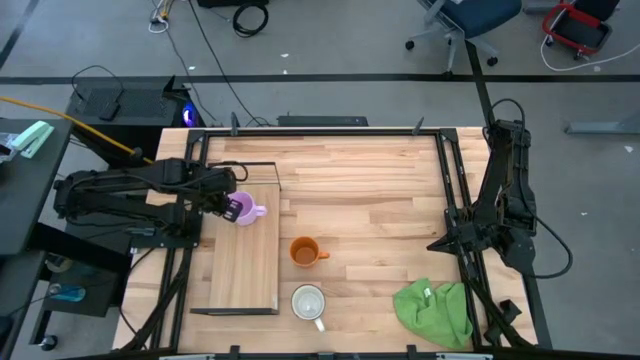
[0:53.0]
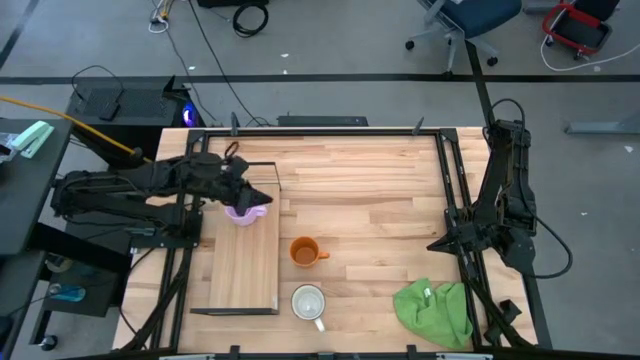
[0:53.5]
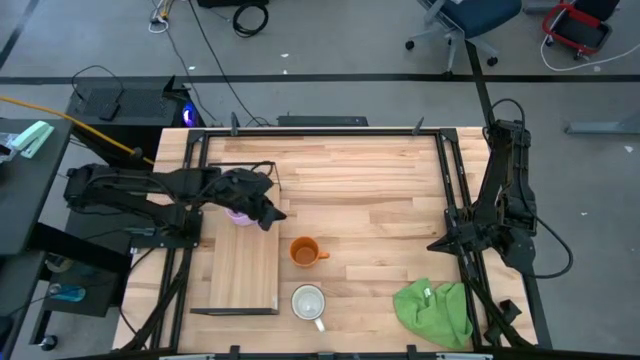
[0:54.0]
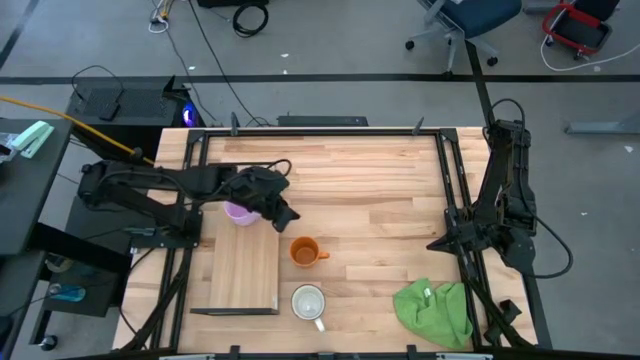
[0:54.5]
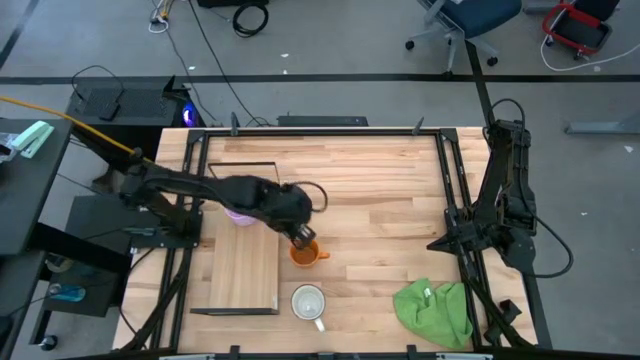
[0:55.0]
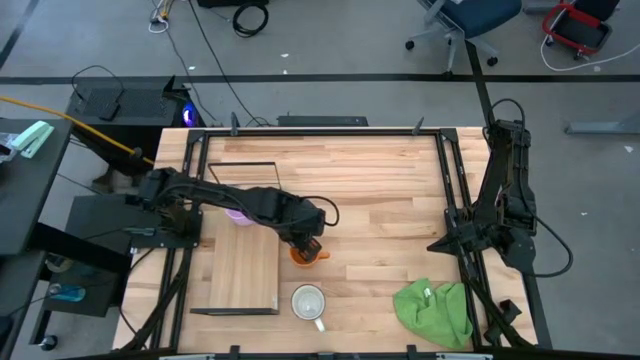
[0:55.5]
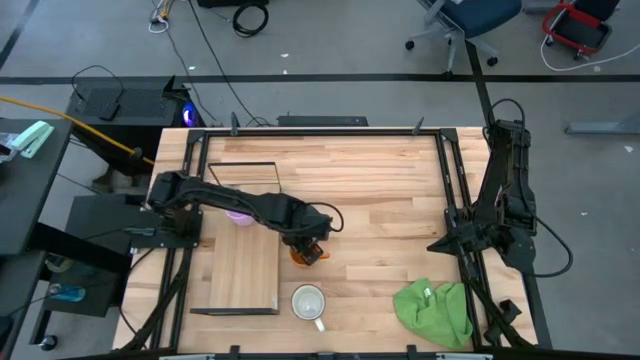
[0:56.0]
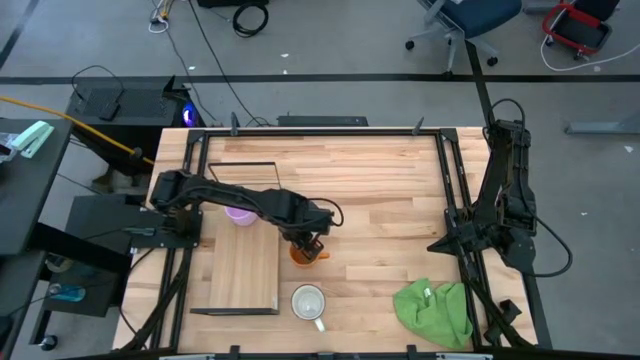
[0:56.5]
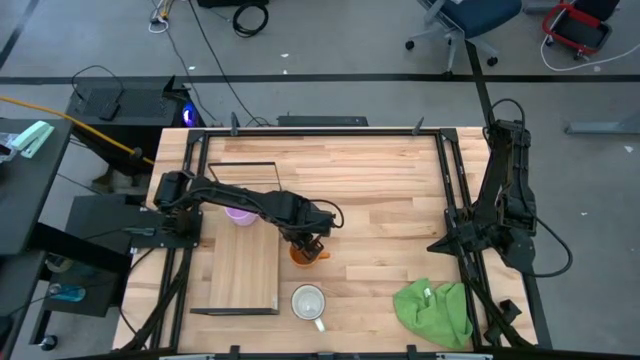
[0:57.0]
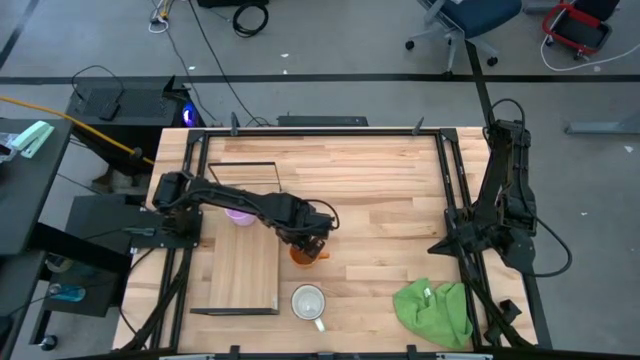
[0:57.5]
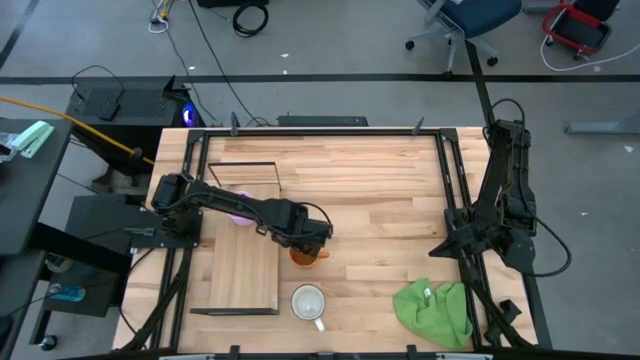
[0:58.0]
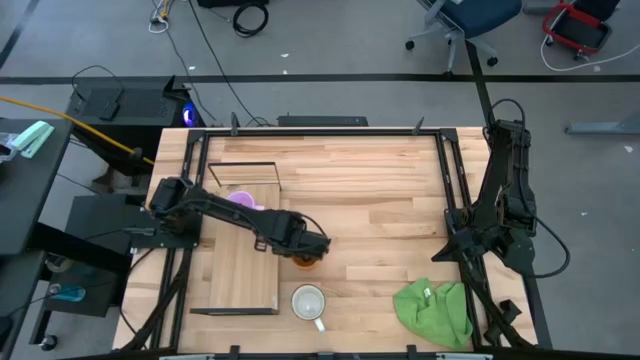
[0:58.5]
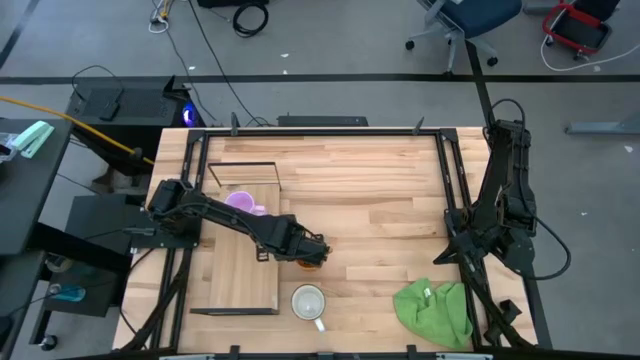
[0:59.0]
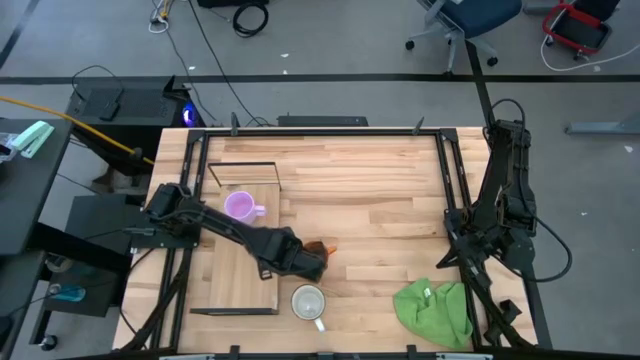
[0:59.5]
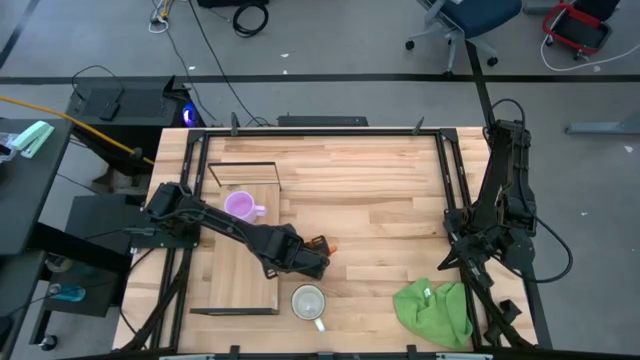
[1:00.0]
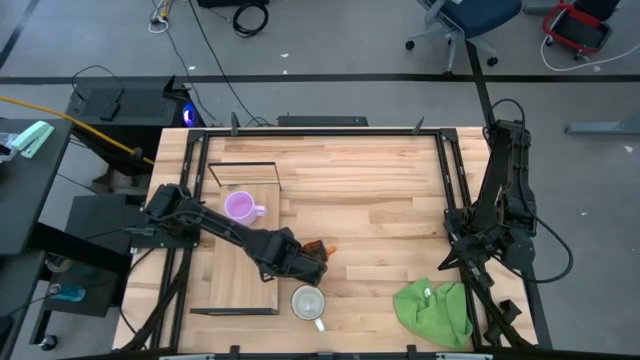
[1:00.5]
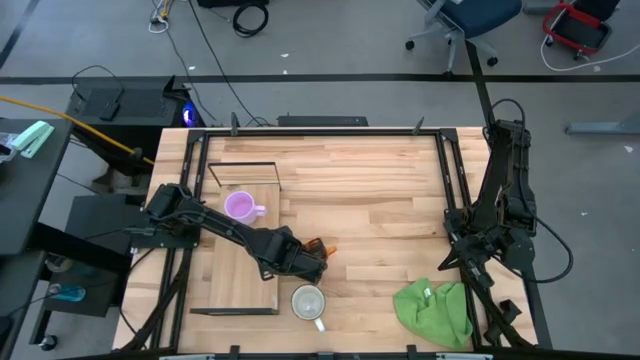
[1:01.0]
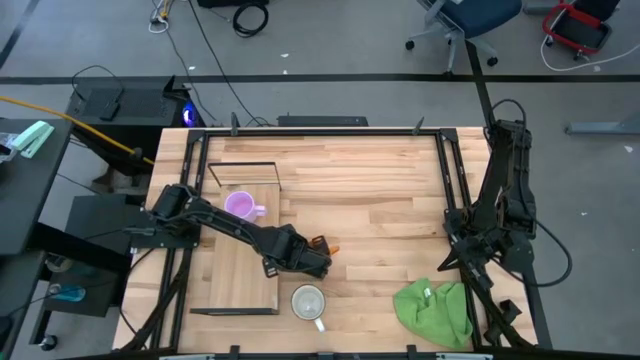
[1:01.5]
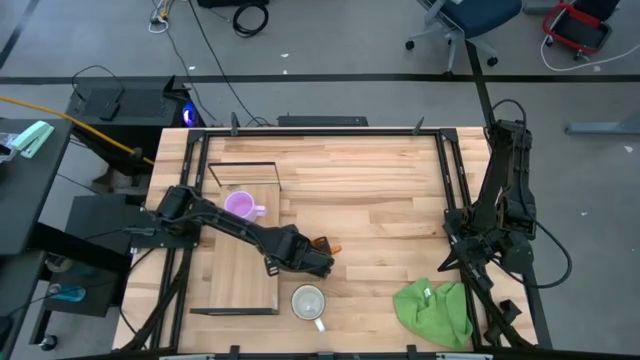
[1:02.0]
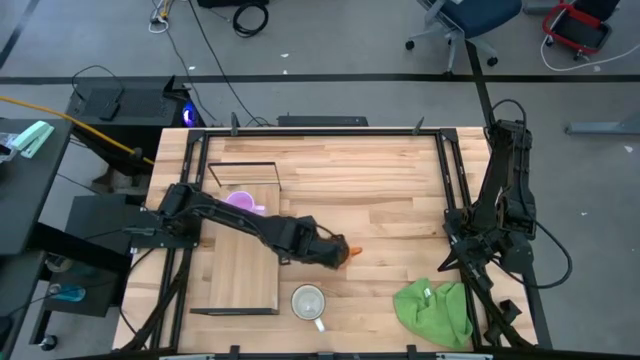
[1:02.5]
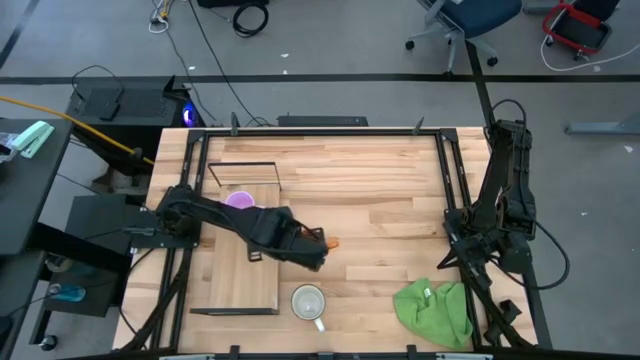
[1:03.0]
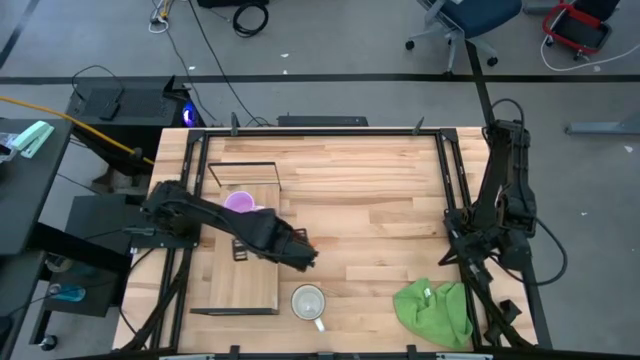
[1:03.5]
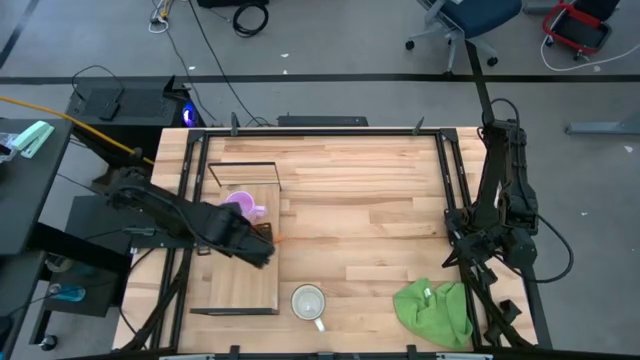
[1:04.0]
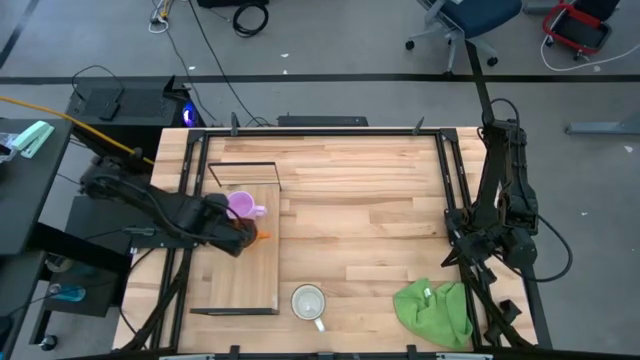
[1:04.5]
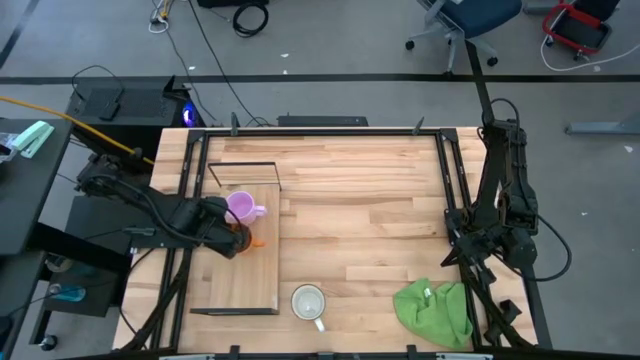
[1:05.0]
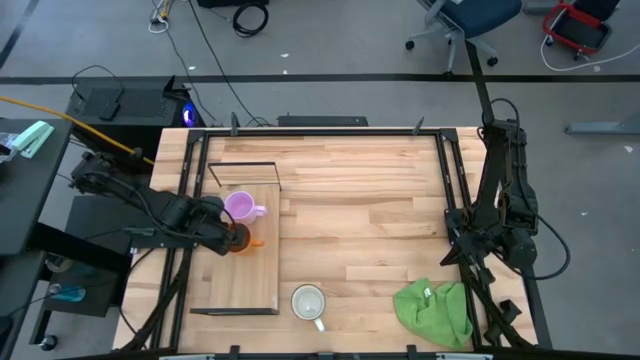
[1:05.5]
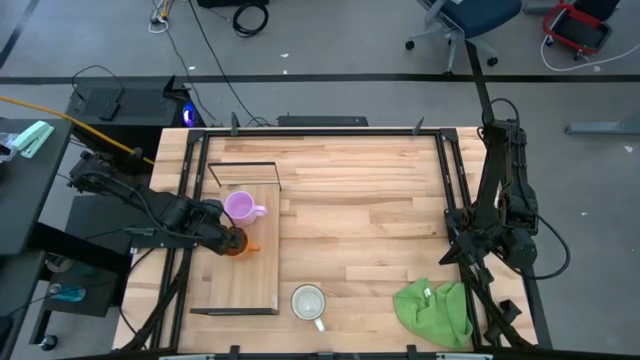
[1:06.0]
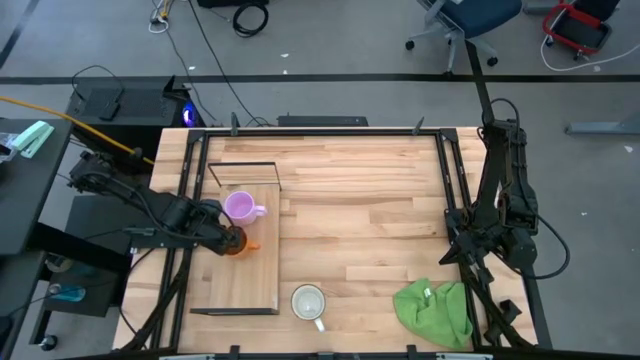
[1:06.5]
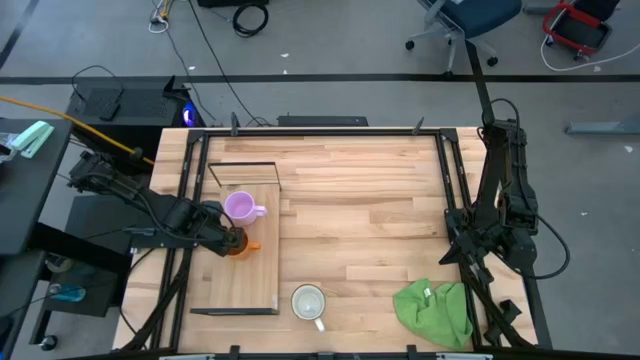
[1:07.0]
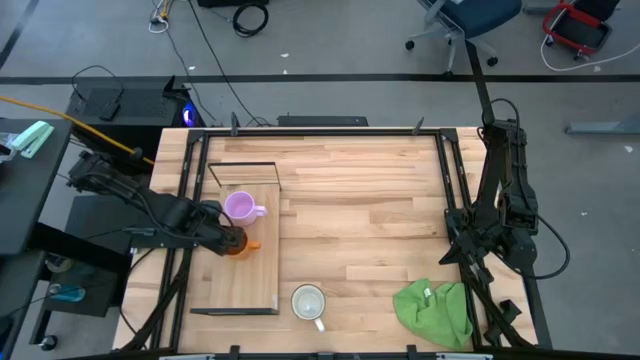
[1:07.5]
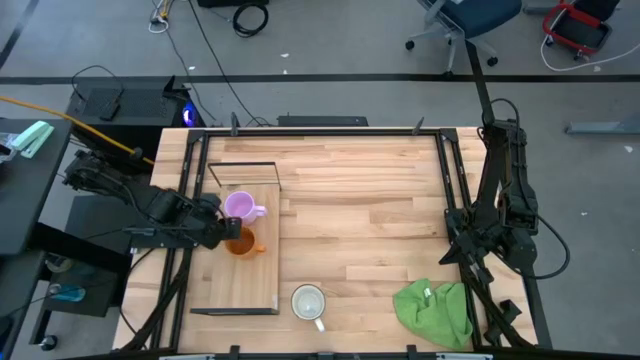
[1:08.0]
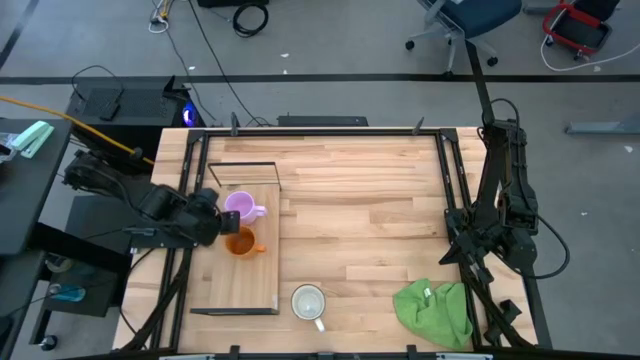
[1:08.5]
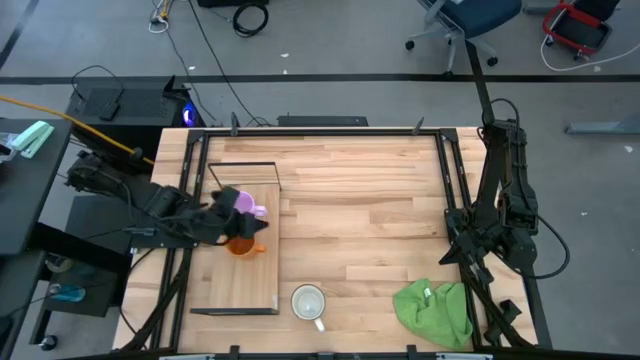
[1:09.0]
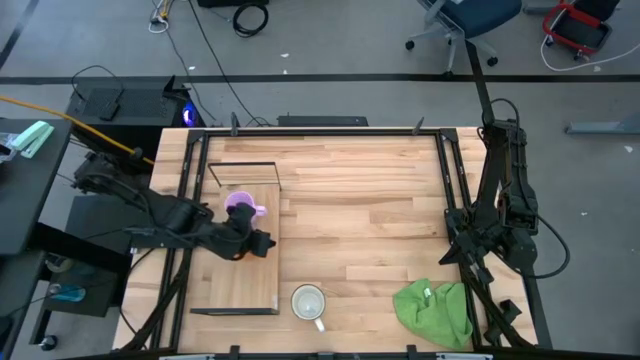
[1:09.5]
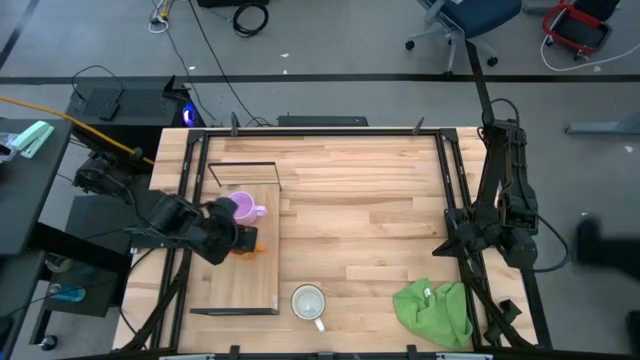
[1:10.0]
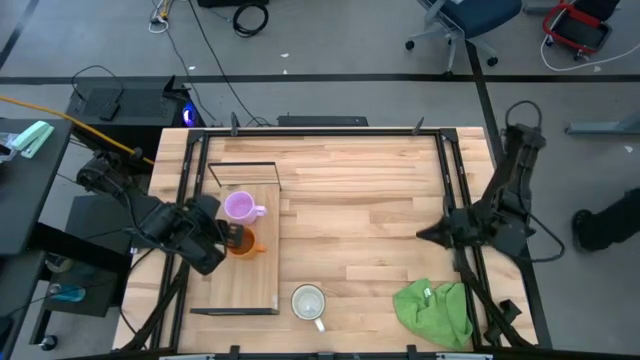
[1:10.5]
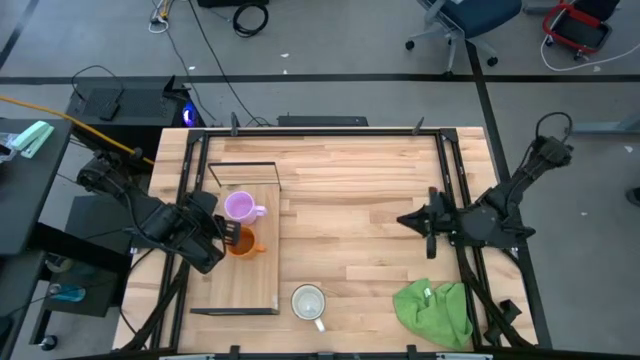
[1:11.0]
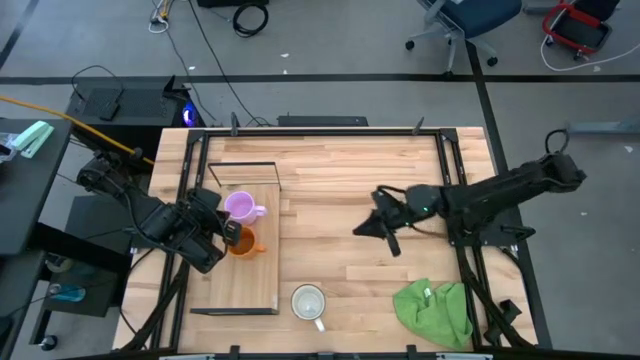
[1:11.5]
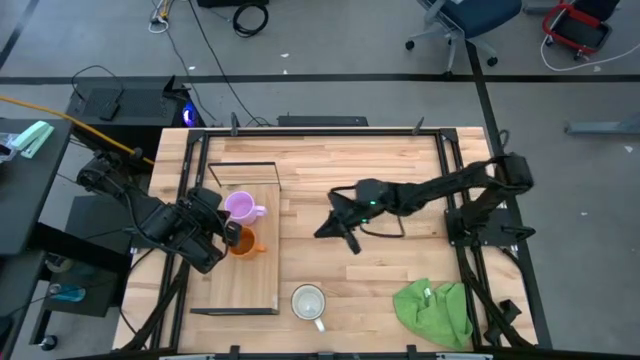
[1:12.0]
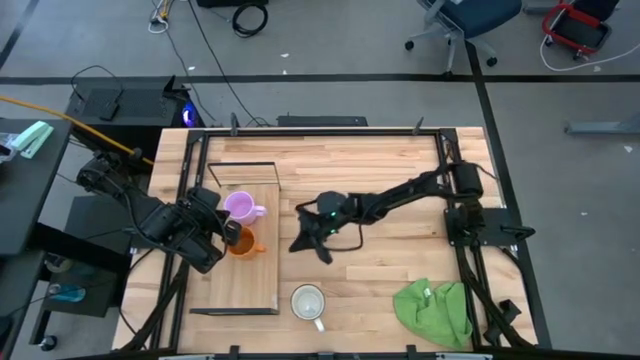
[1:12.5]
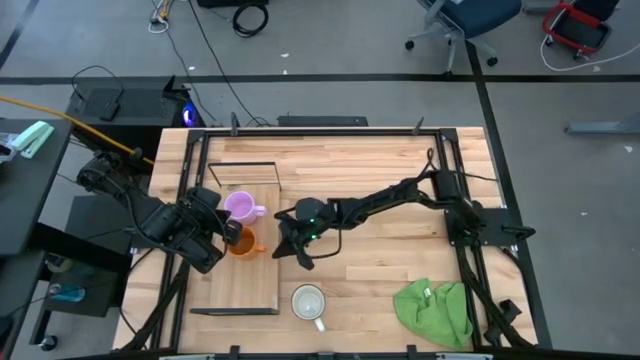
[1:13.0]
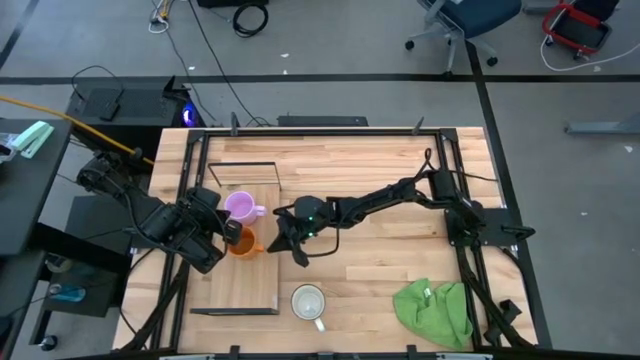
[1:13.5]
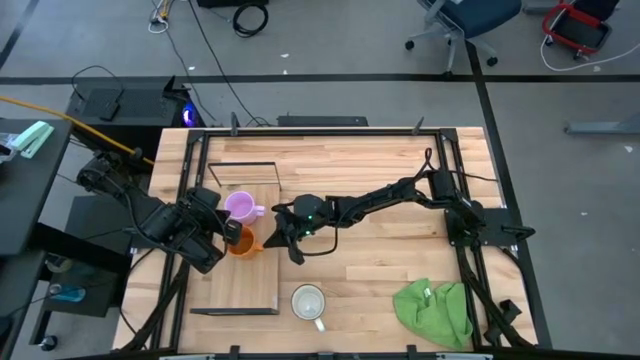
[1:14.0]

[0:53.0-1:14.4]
Task: Stack small to large cups/mugs on shelf
Put the orange mug on the shelf
